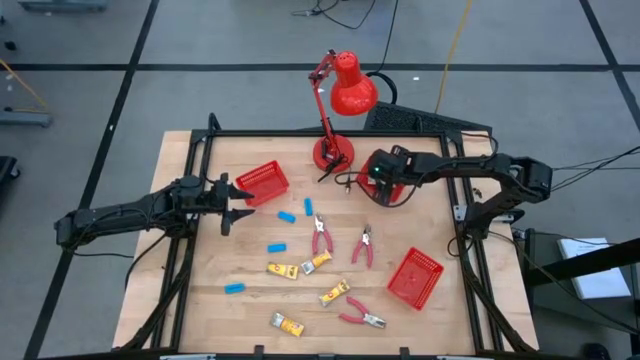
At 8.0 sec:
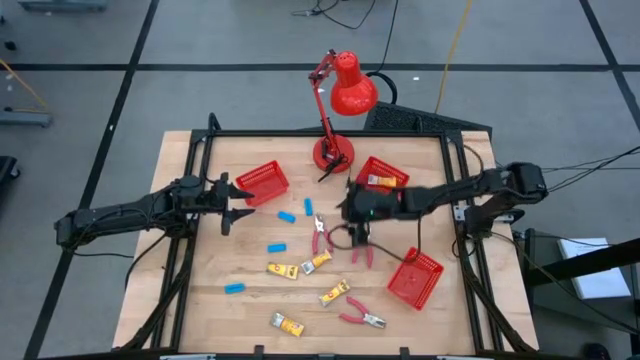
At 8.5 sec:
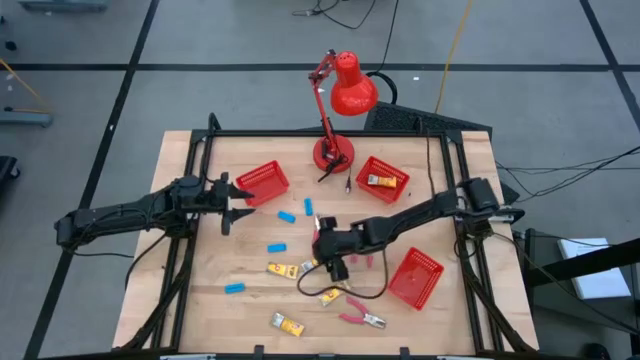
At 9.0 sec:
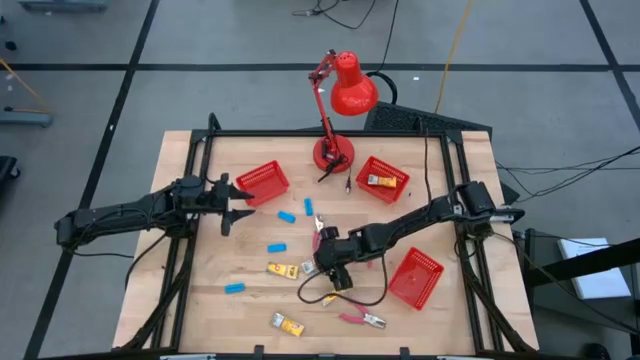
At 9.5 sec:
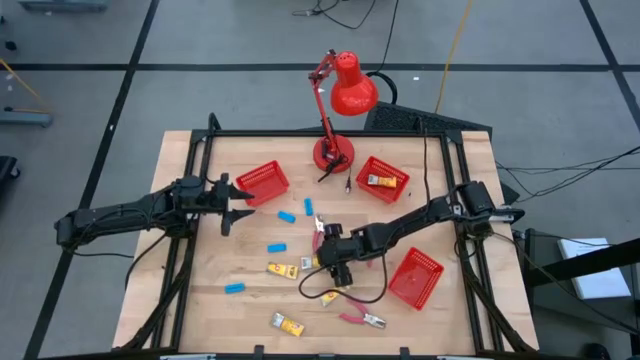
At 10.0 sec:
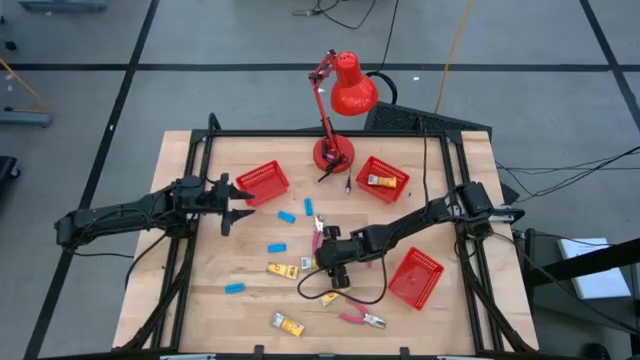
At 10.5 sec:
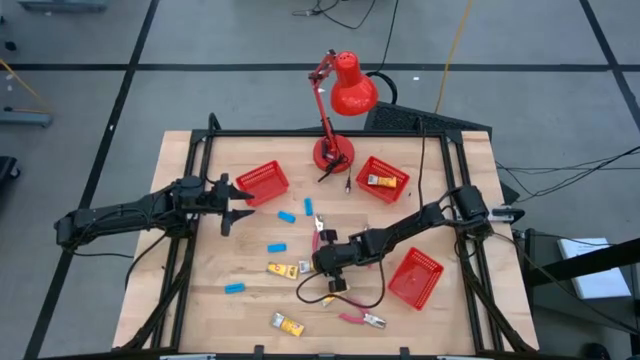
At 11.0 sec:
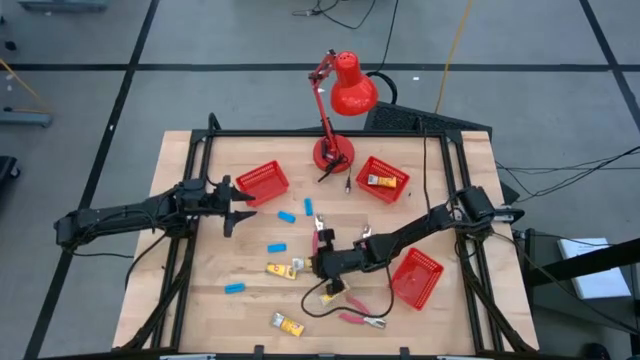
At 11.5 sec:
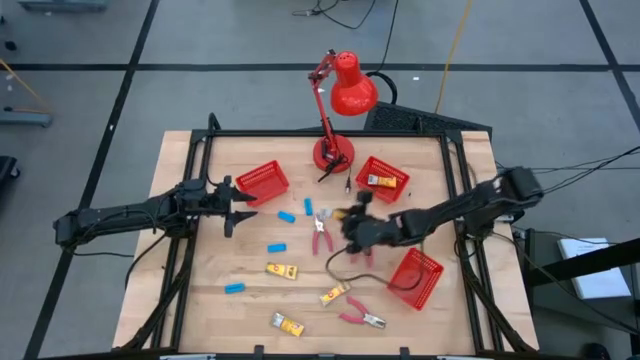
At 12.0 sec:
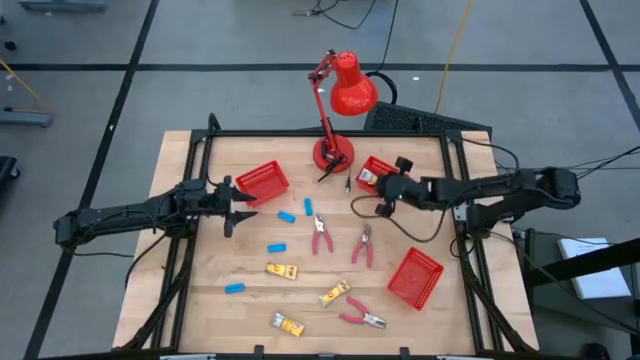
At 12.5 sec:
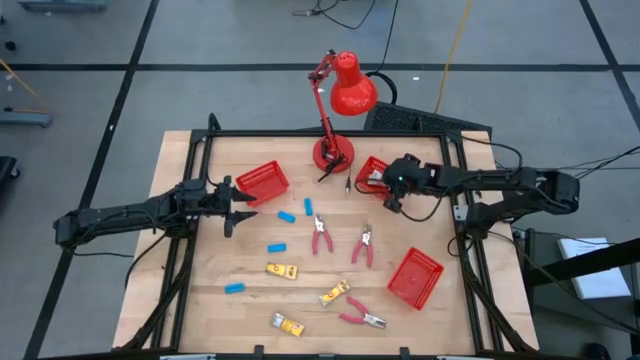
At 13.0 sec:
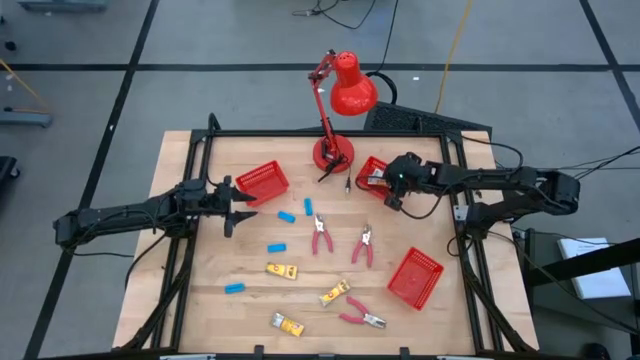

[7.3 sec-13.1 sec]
Task: Pick & Place School Supplies
Put the yellow crayon box into the top right red bin

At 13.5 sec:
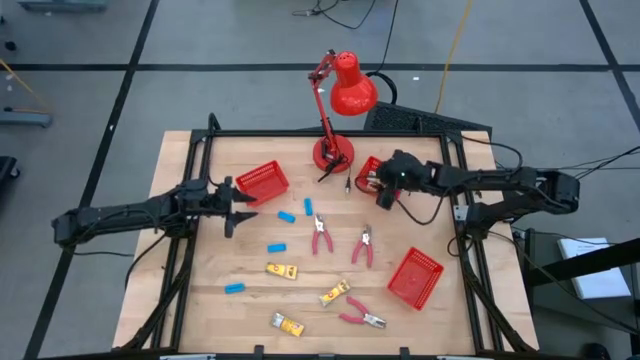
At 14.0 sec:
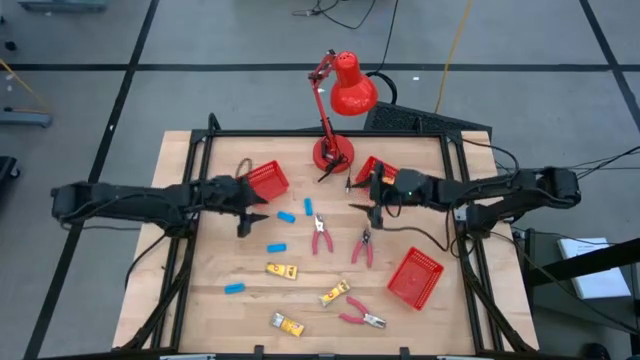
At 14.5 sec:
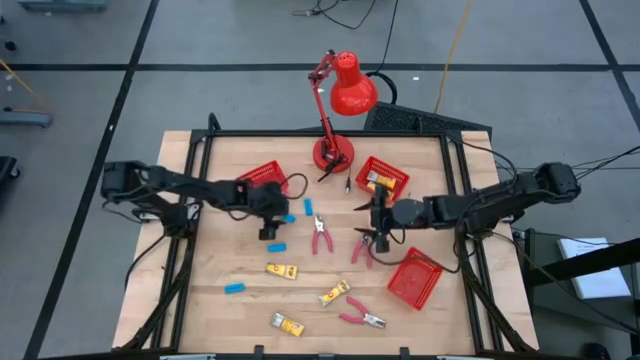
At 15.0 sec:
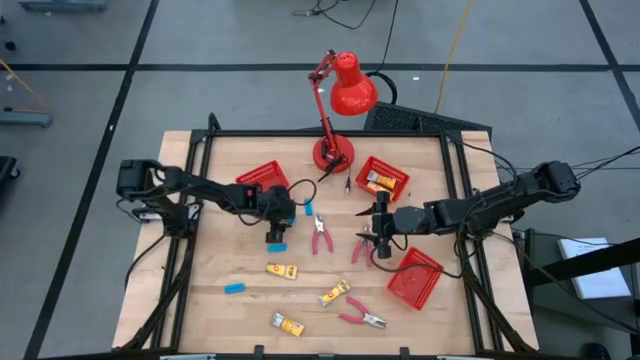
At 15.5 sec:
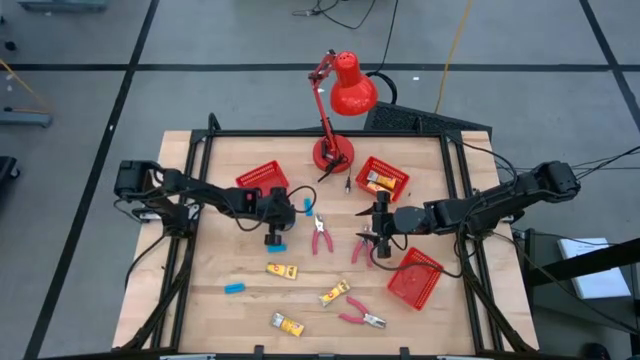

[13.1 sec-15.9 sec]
Put the blue eraser into the left red bin

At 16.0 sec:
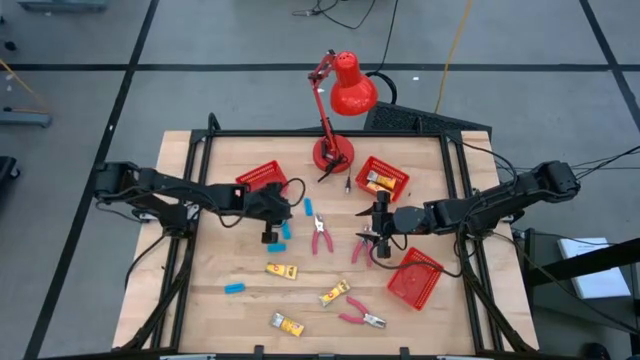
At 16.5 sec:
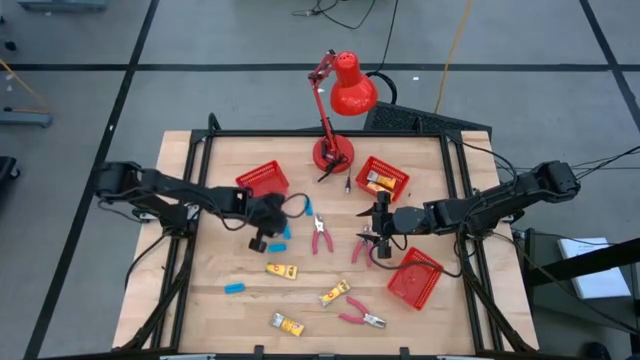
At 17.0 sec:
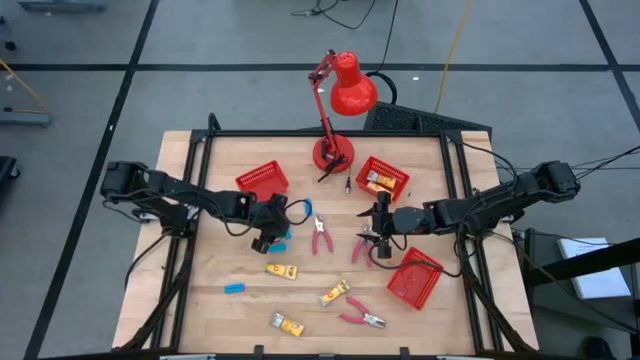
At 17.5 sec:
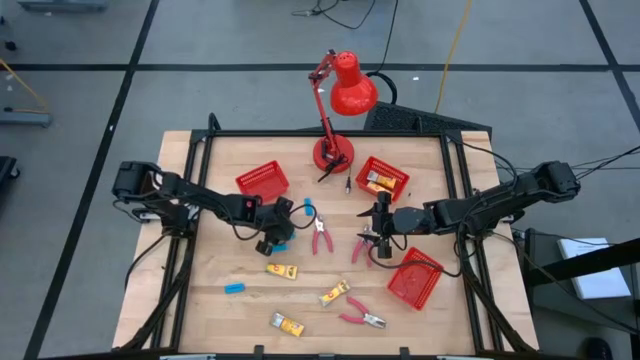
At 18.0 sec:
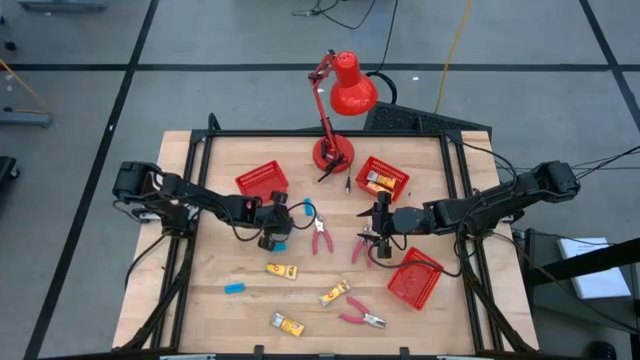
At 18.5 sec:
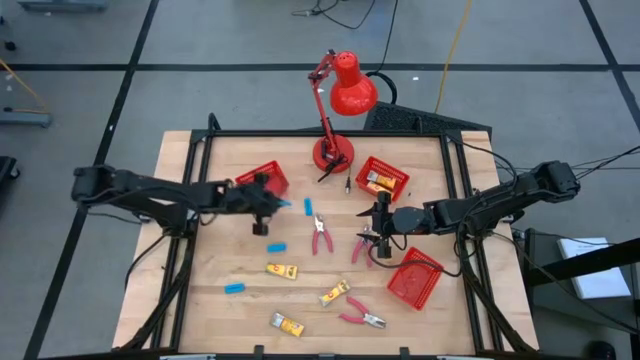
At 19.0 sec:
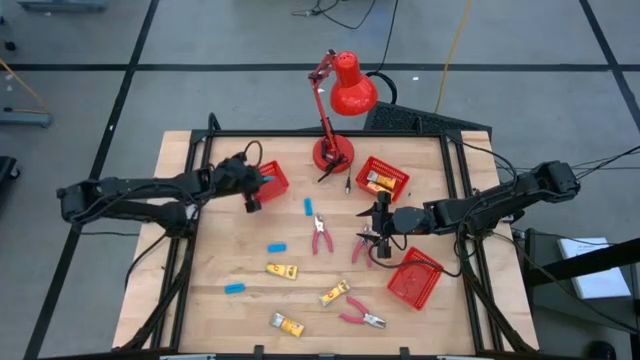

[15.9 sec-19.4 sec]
Put the blue eraser into the left red bin

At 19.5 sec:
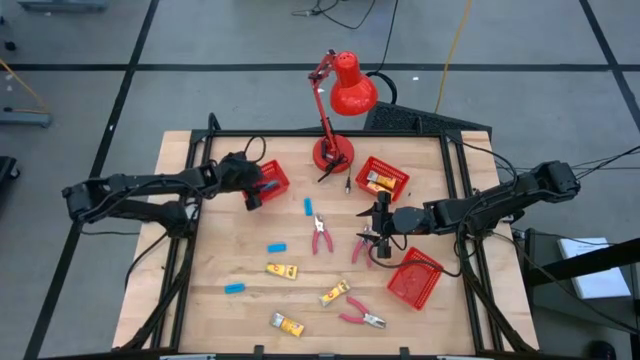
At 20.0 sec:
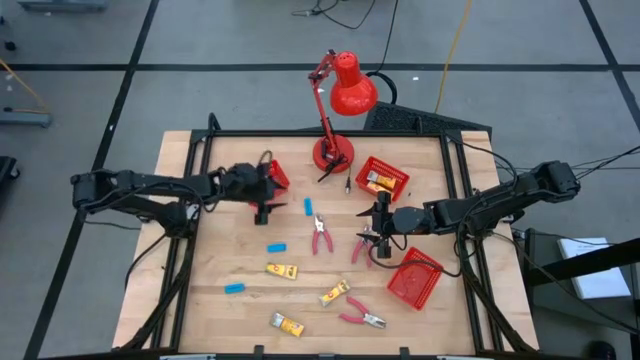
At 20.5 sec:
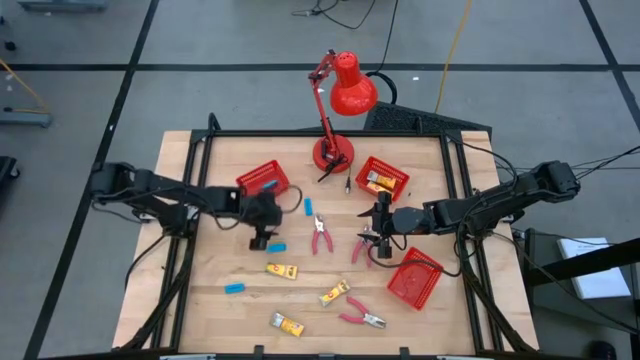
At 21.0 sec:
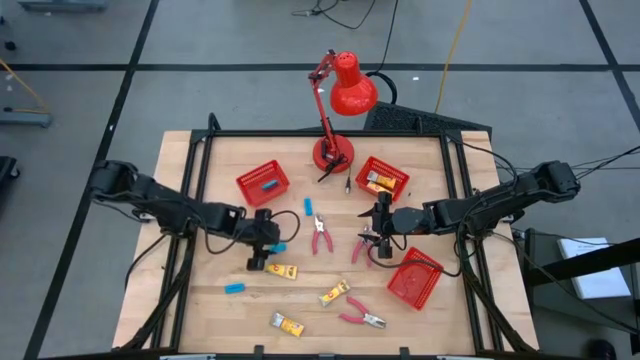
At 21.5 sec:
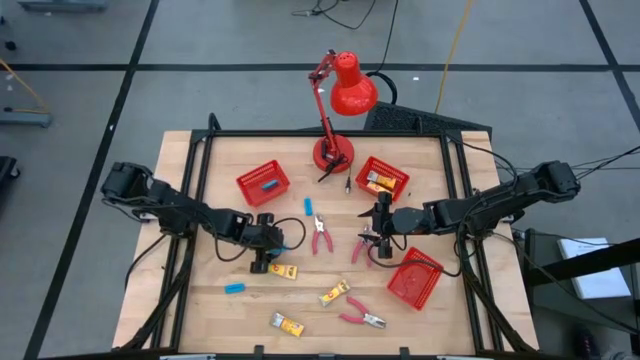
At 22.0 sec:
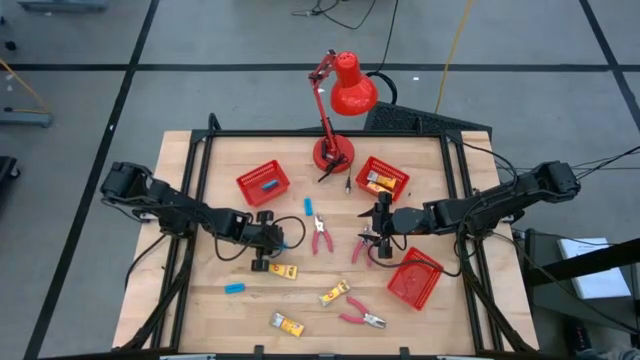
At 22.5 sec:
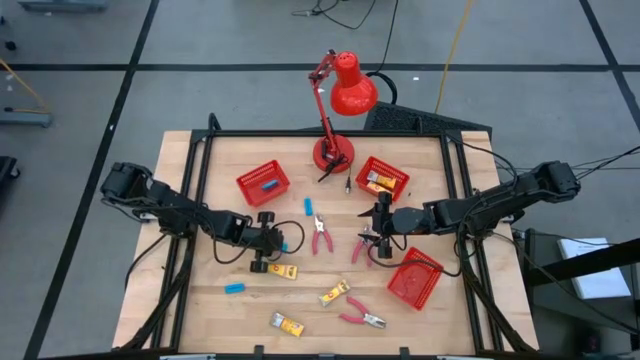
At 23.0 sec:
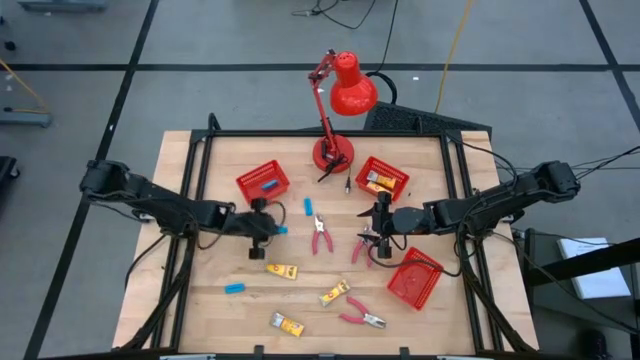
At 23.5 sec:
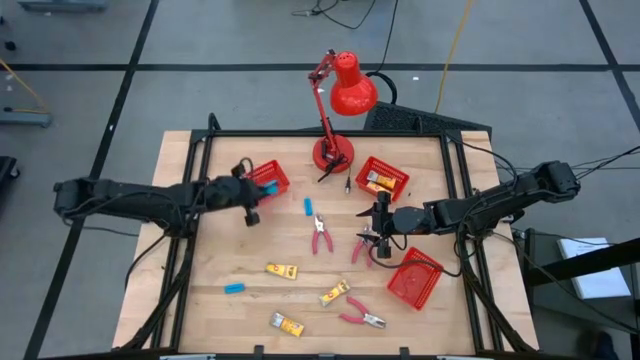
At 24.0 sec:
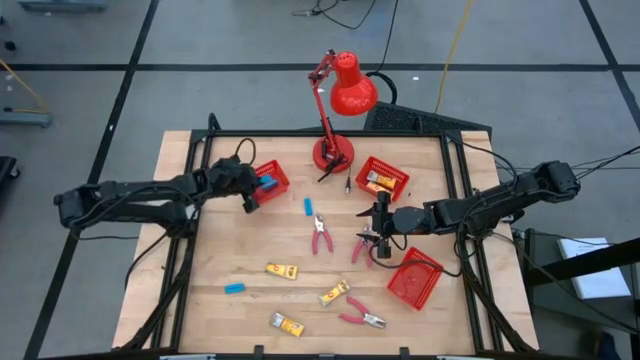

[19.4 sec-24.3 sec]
Put the blue eraser into the left red bin

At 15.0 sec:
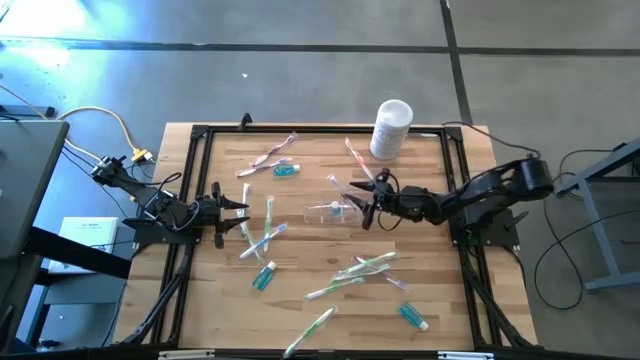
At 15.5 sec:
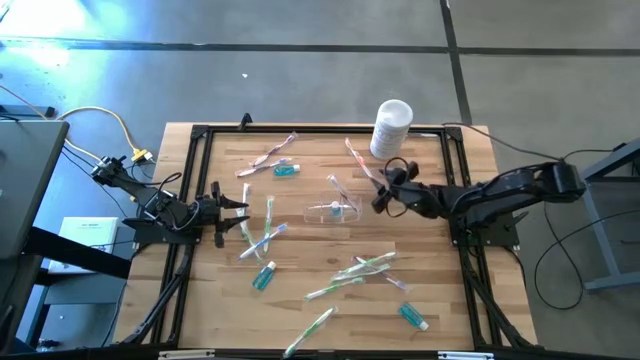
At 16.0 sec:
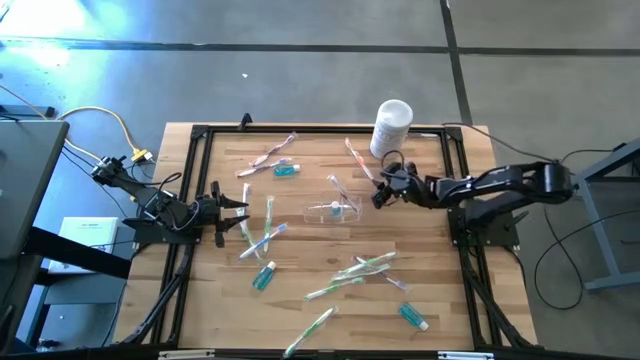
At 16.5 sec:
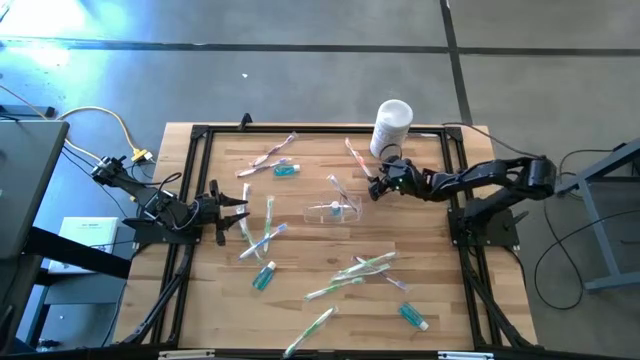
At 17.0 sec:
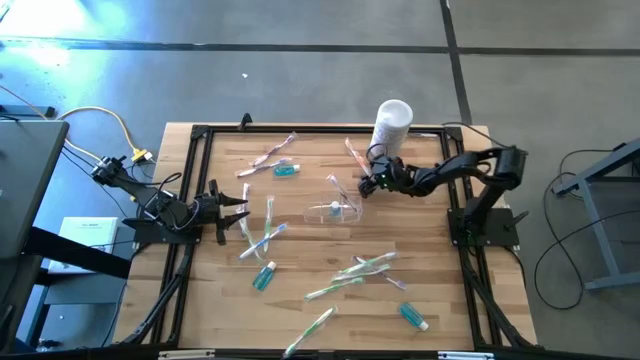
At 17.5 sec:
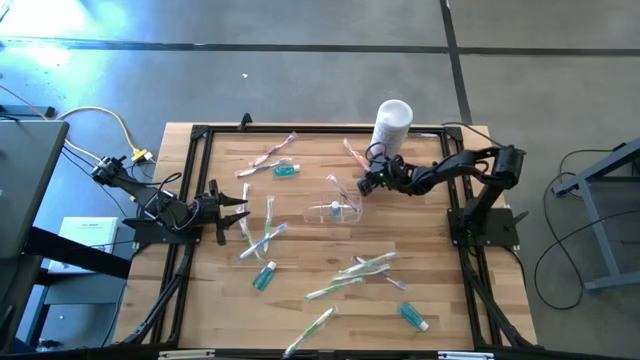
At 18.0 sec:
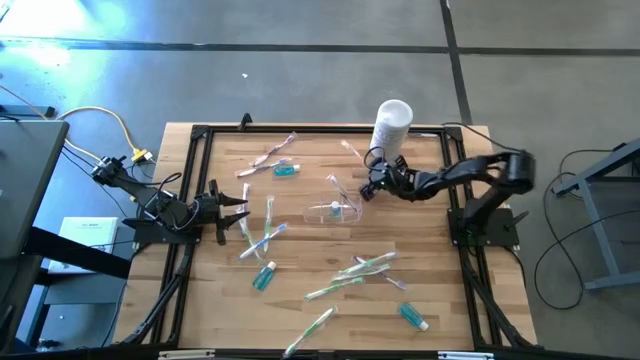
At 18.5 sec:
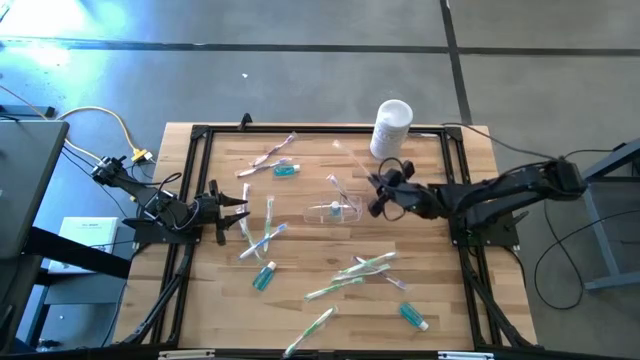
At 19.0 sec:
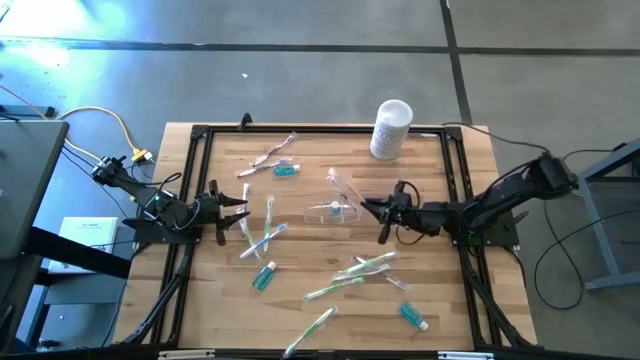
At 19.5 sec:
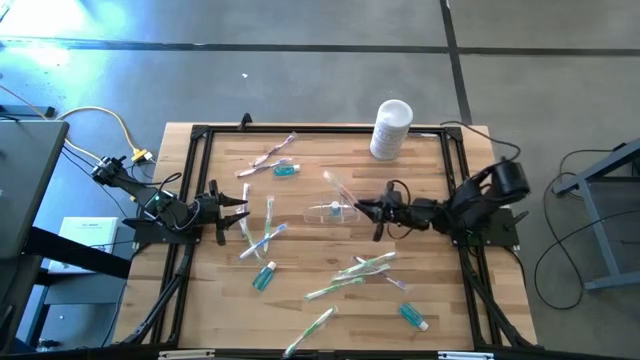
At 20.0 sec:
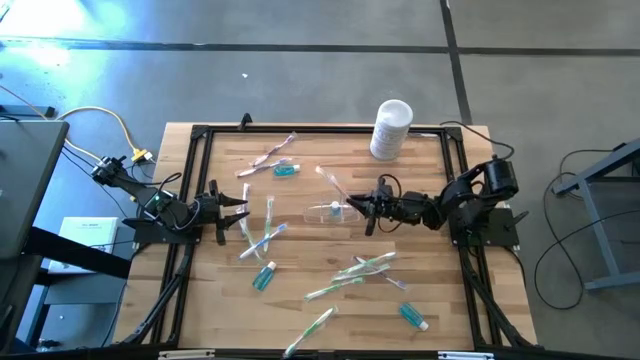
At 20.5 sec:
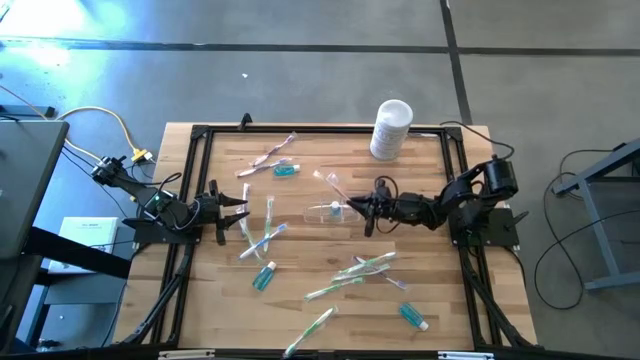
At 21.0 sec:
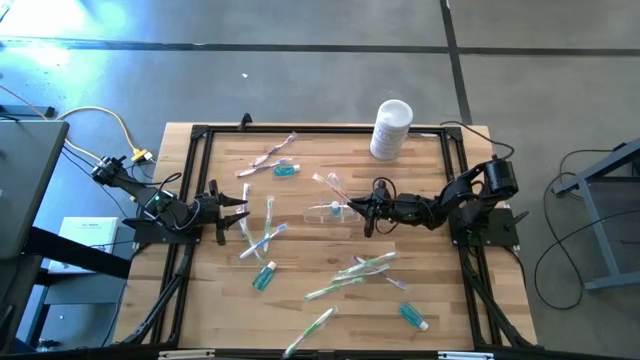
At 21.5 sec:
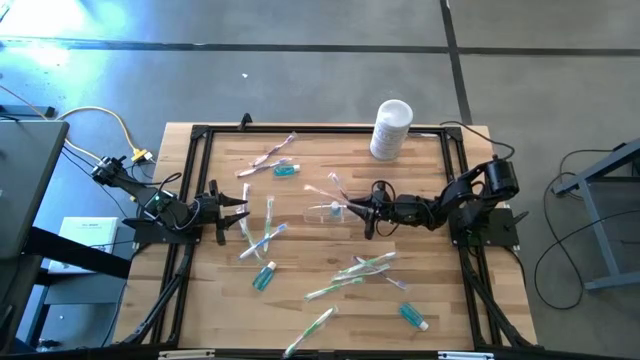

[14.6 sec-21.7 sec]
Task: Pick & Place toothbrushing station
Put the orange toothbrush into the transparent organizer
